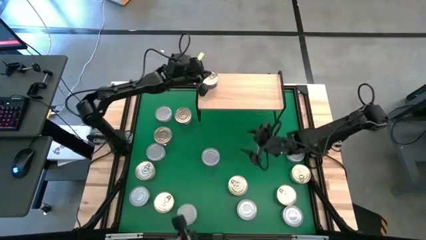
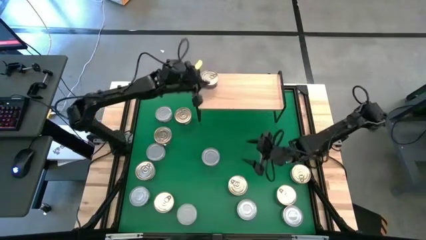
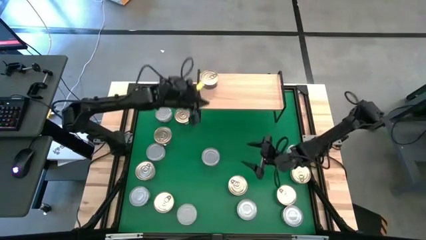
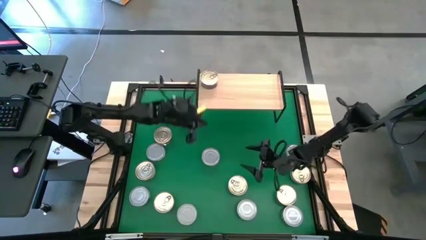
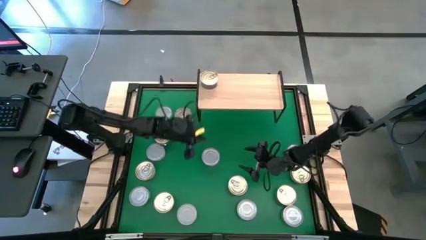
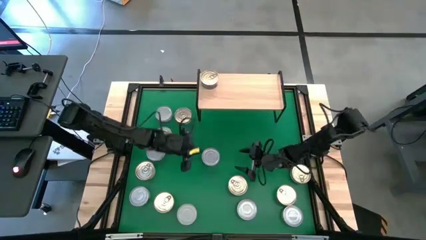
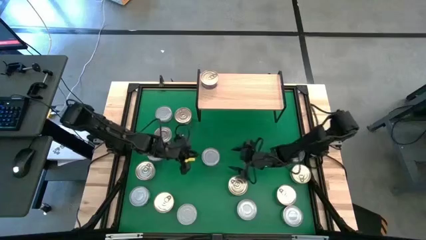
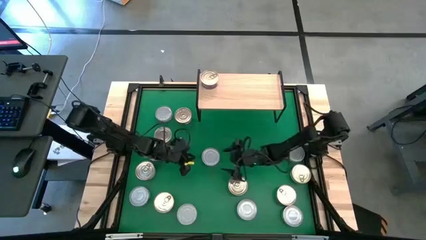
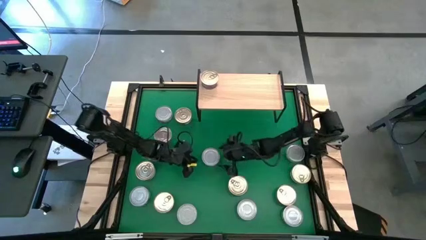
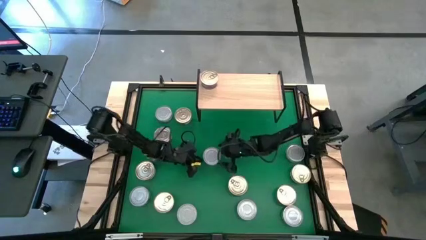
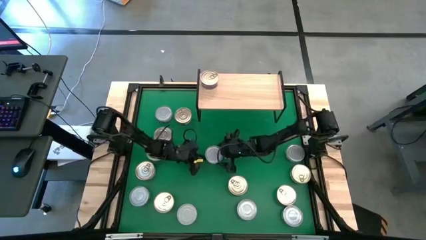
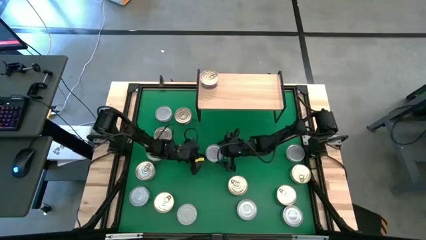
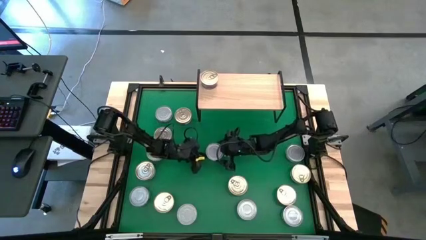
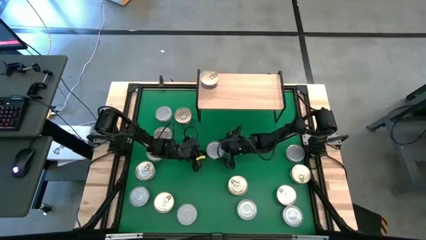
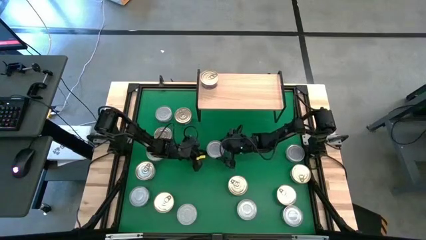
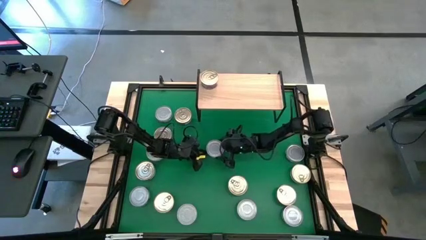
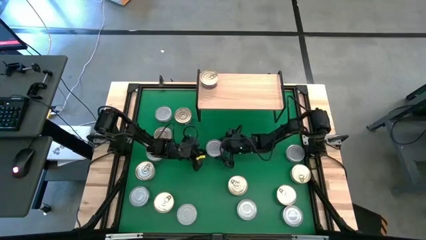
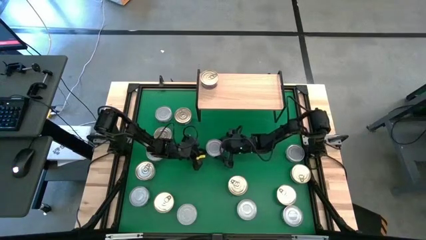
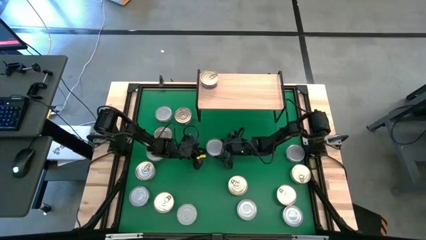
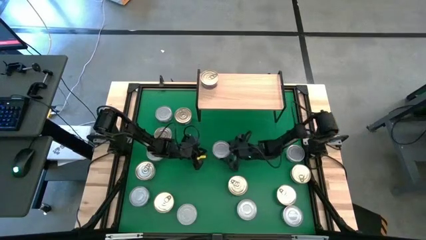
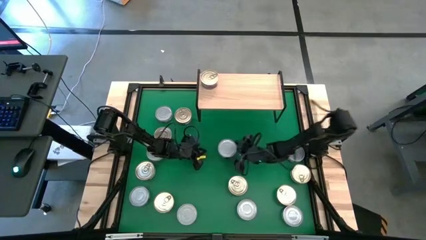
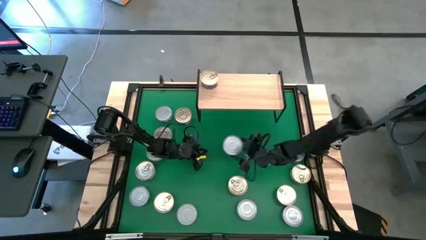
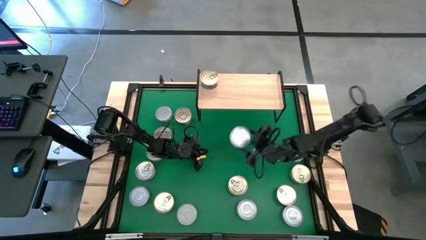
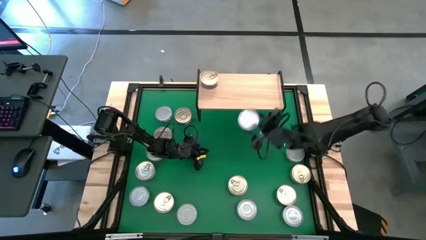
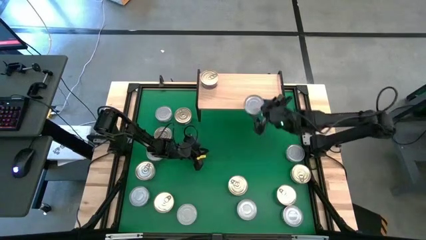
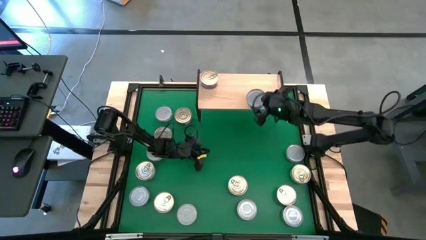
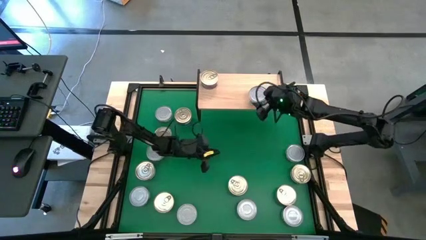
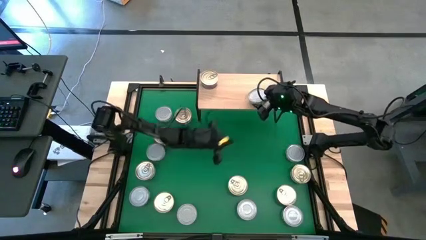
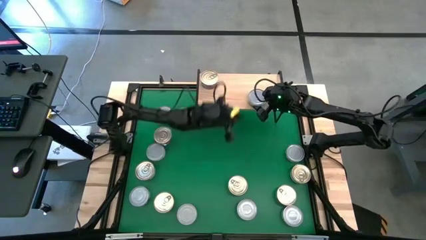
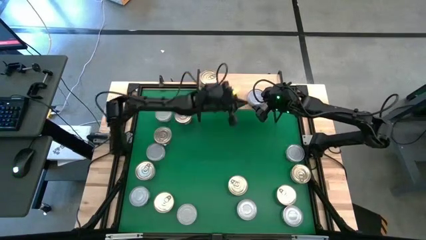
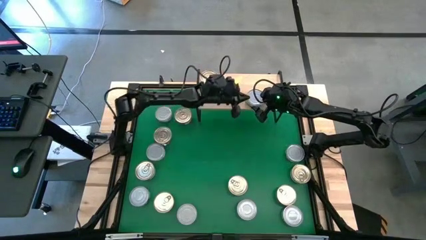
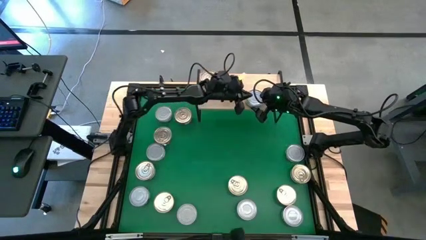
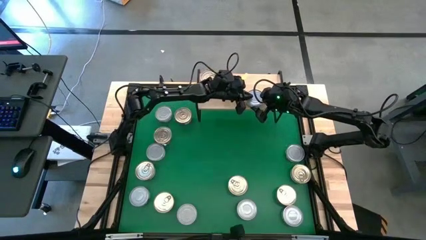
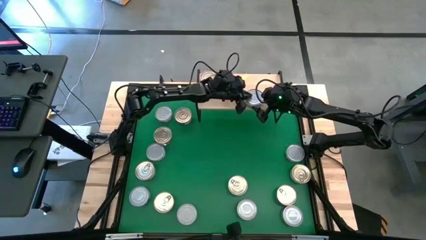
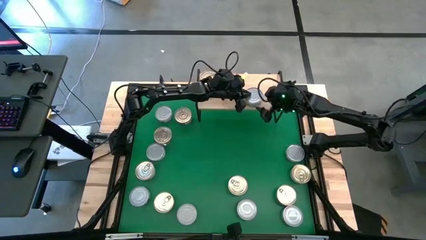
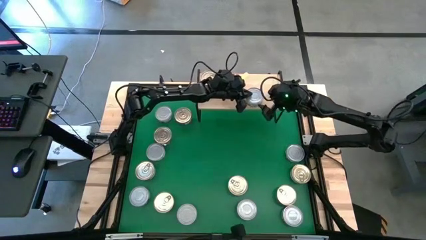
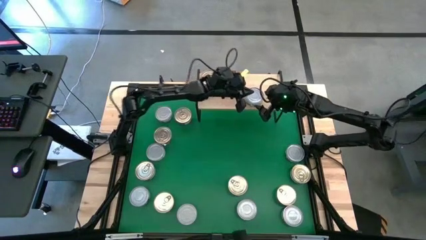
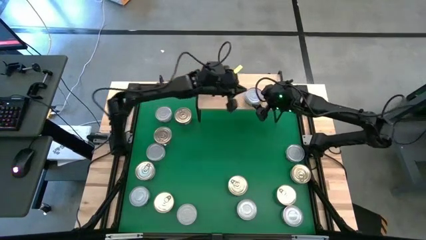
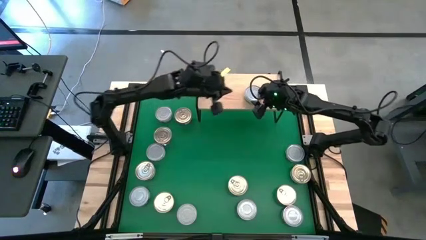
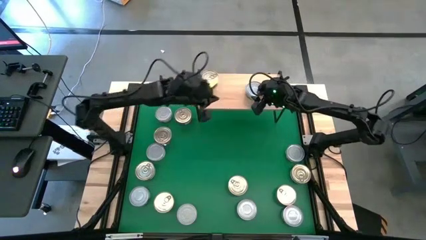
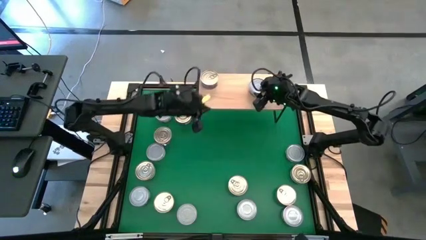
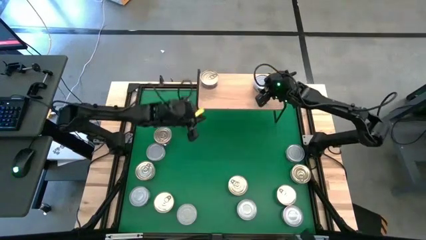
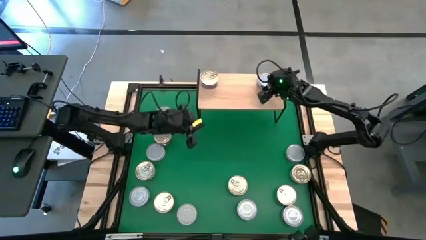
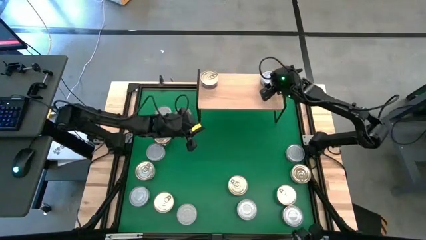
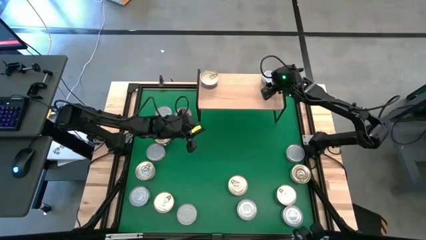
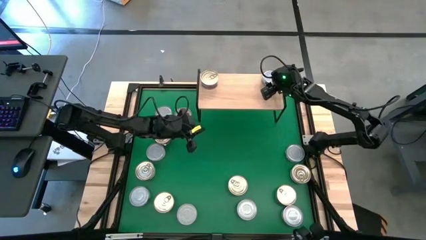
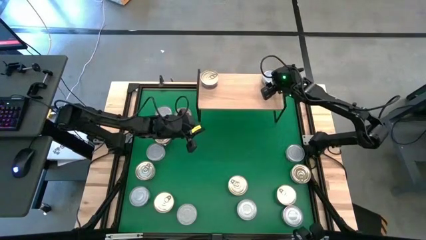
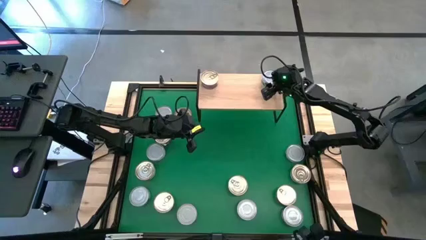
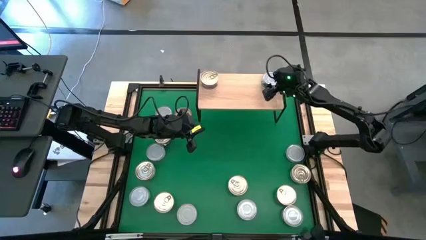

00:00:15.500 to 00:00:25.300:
Task: Stack canned seafood by type on shelf
Put the green tuna can on the shelf

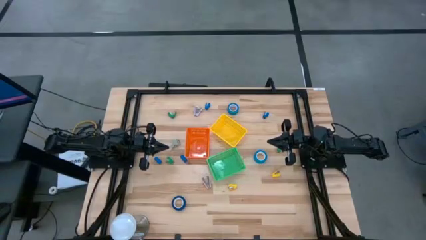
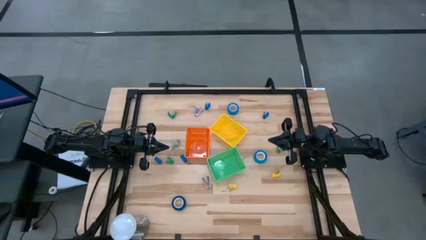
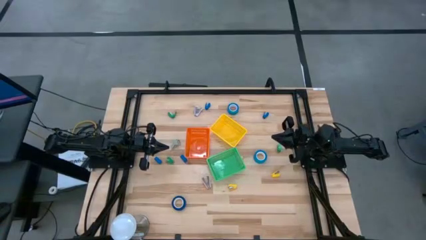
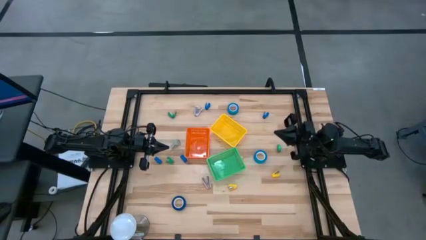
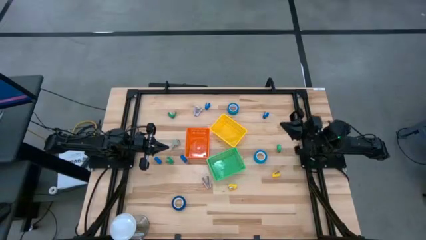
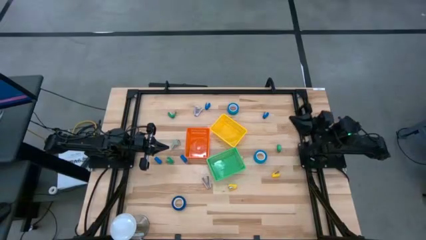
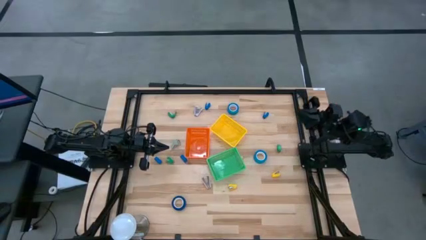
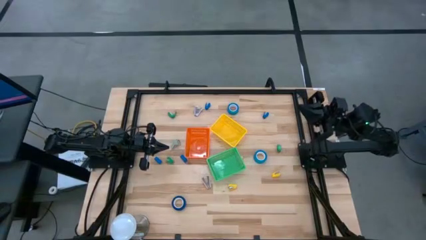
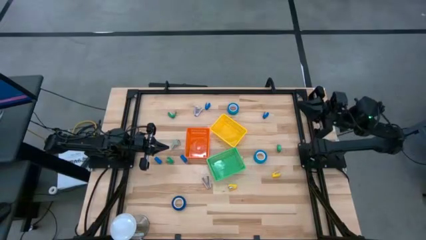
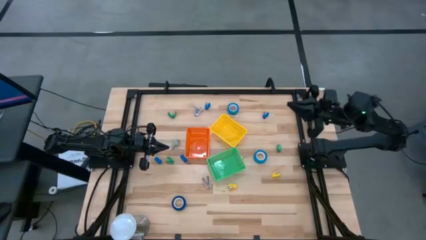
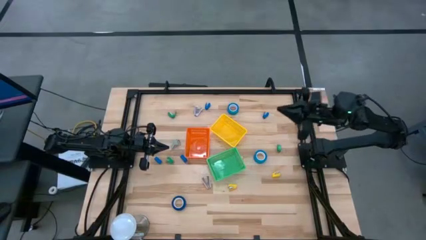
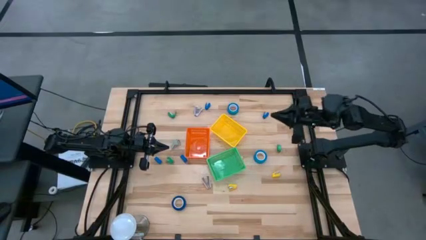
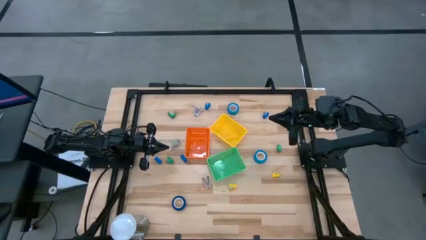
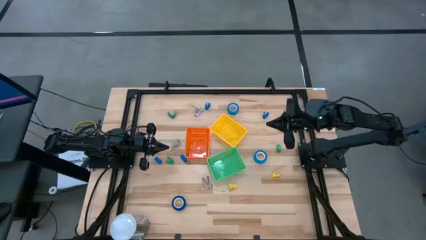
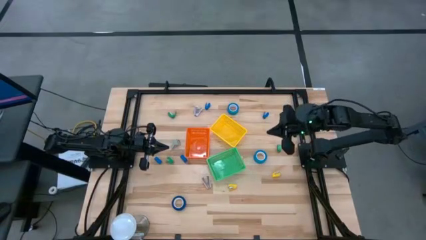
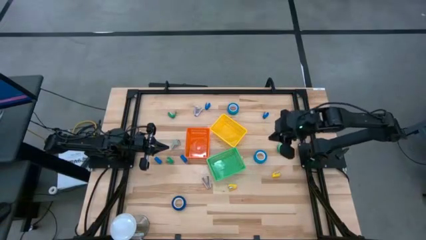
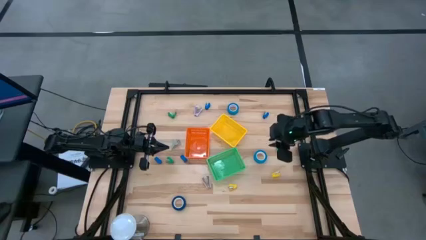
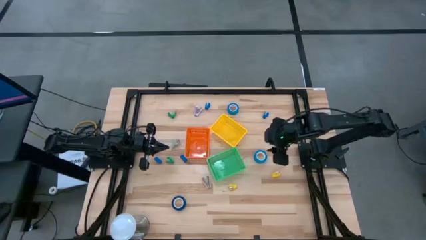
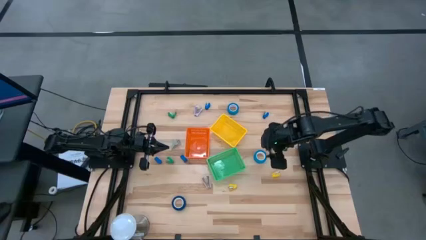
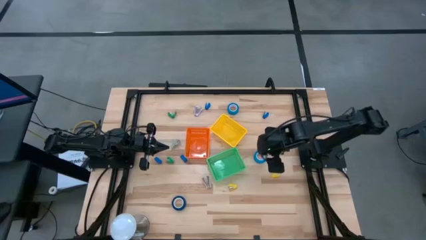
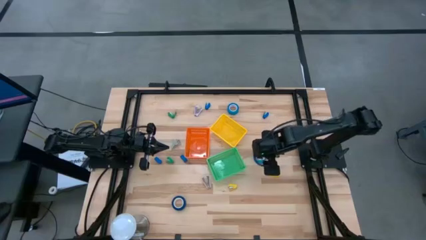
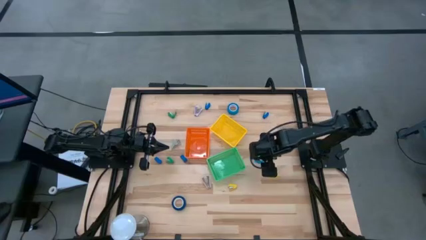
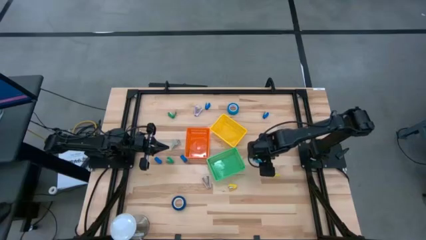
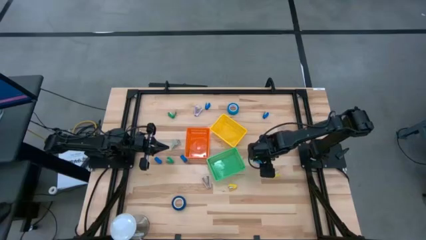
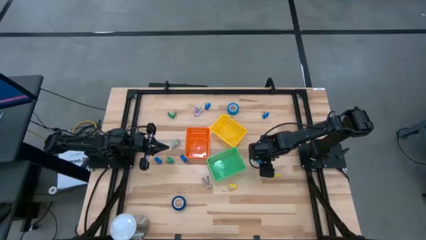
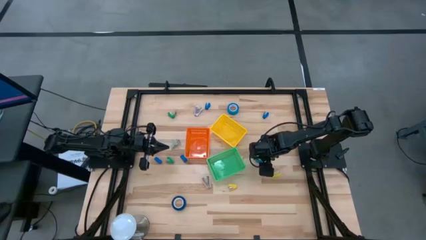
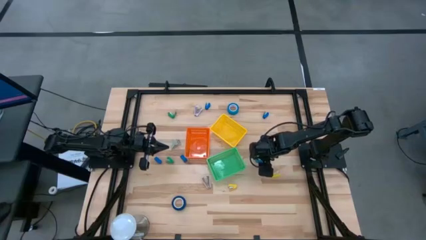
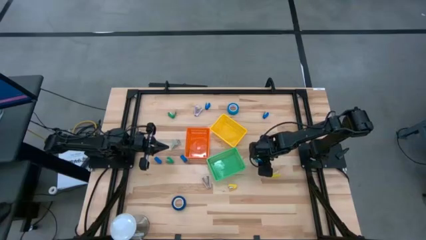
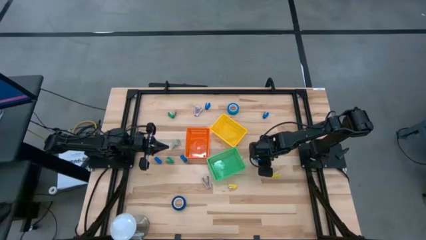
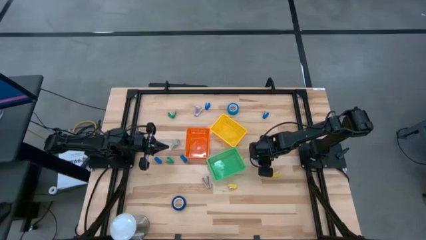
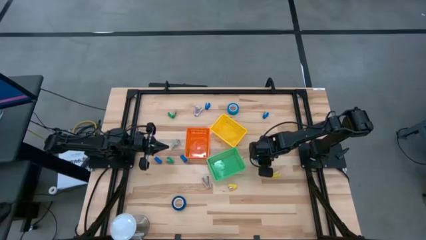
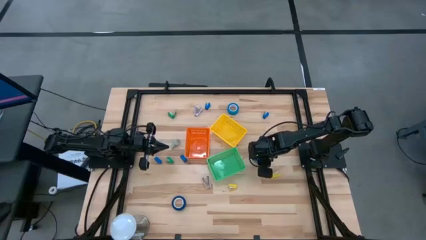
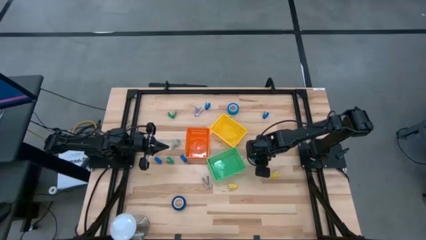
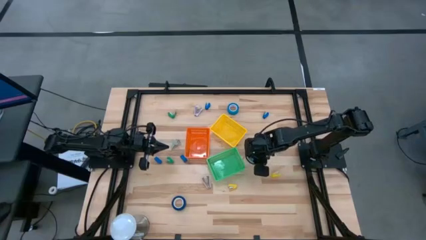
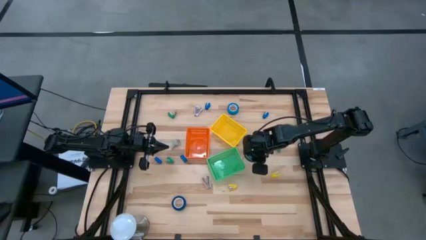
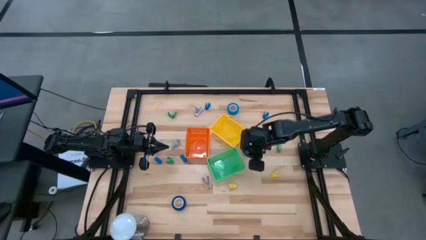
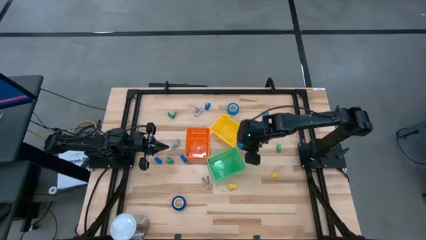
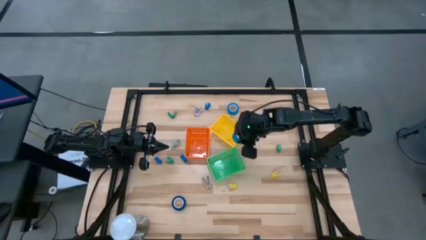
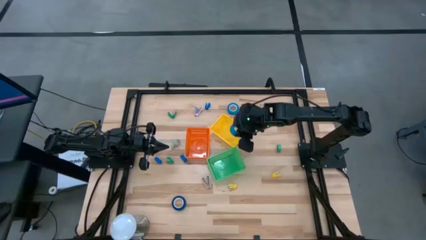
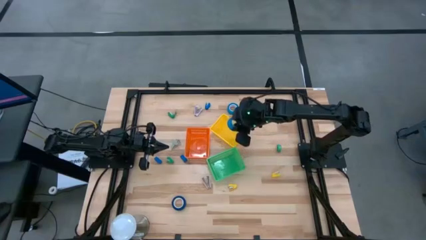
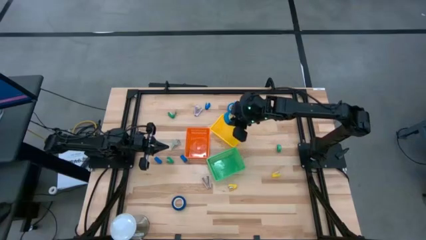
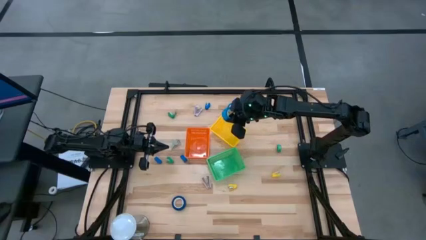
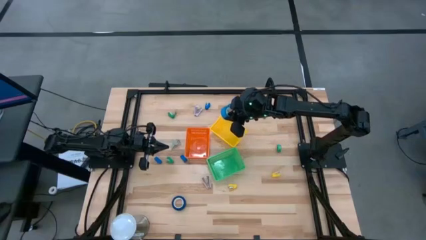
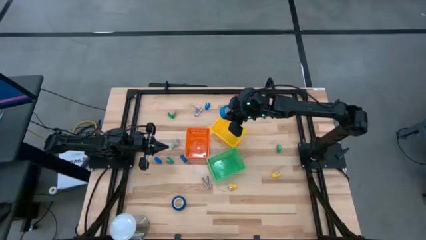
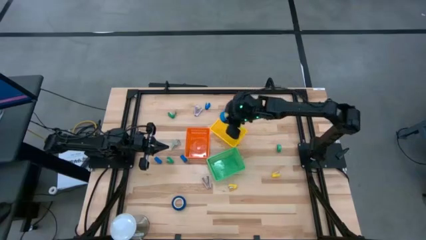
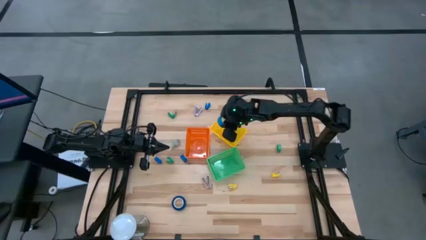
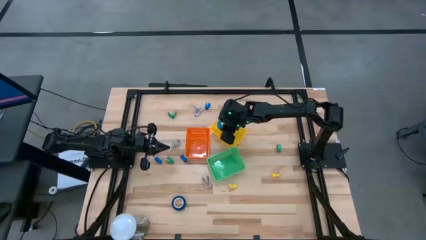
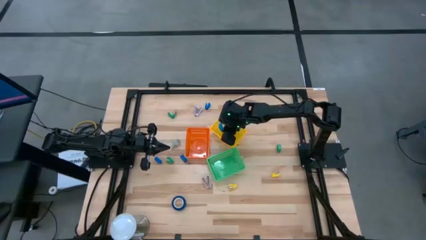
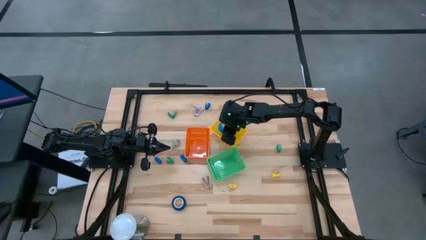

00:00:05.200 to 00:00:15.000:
Task: Pick and place Stapler, Stapler remover, tape
Put the blue tape into the yellow bin
